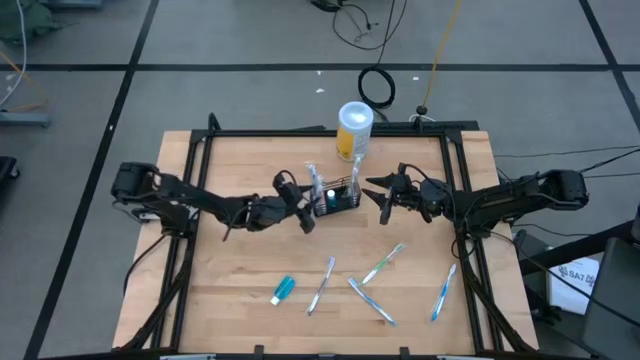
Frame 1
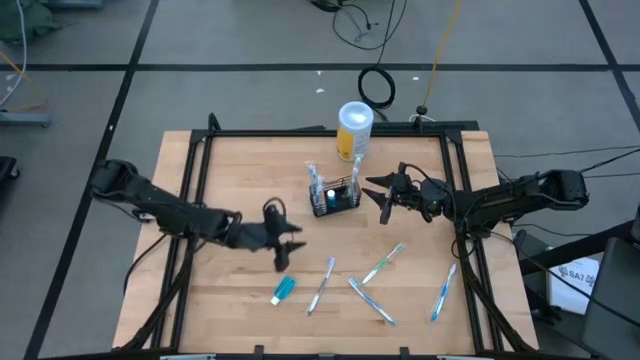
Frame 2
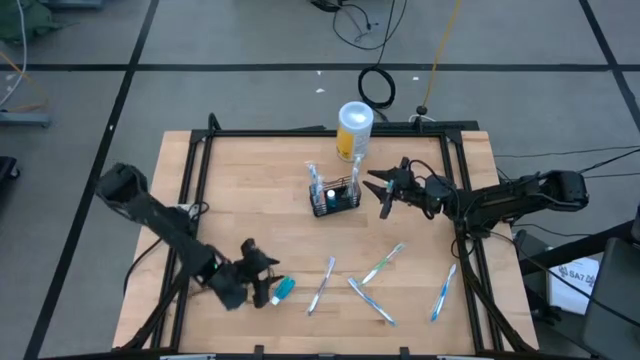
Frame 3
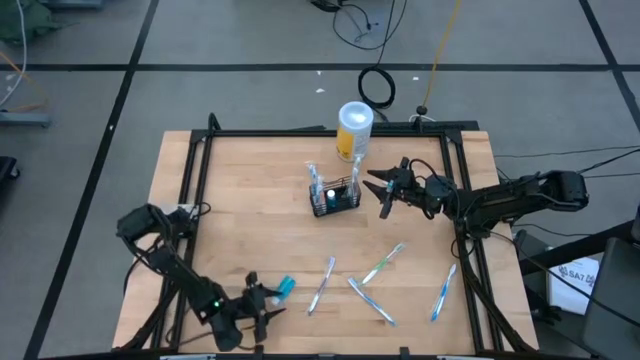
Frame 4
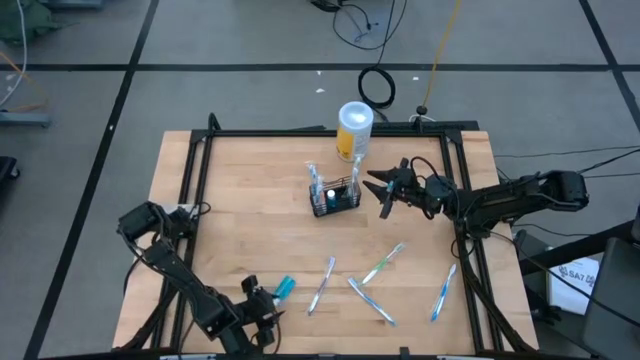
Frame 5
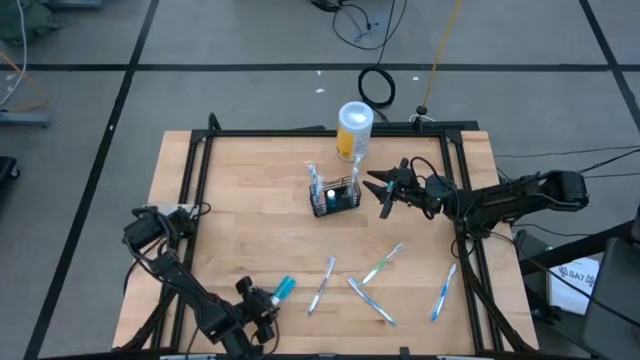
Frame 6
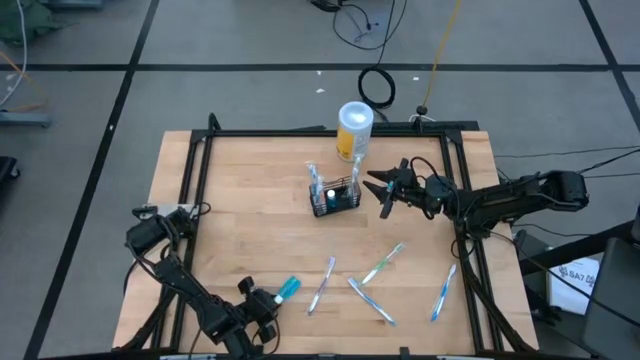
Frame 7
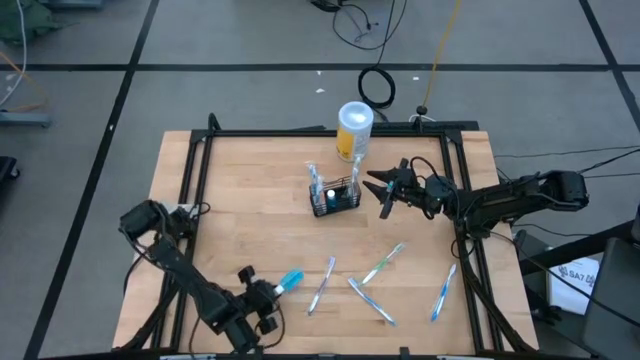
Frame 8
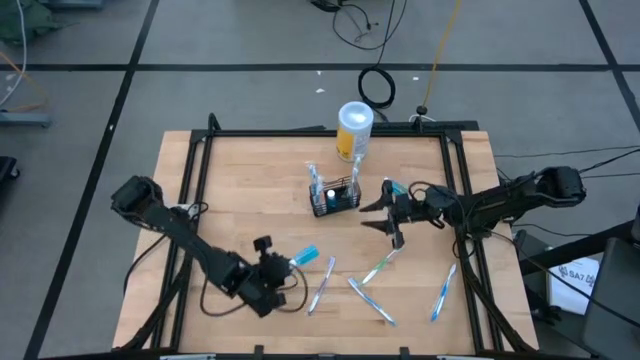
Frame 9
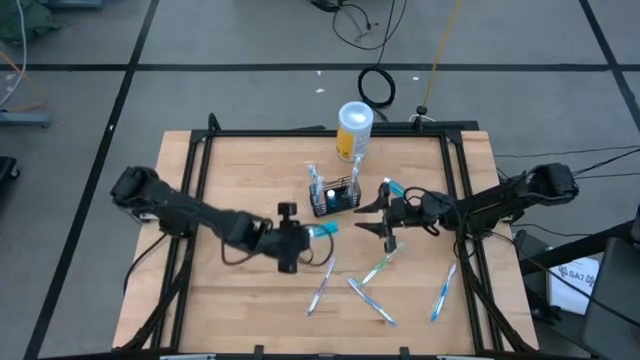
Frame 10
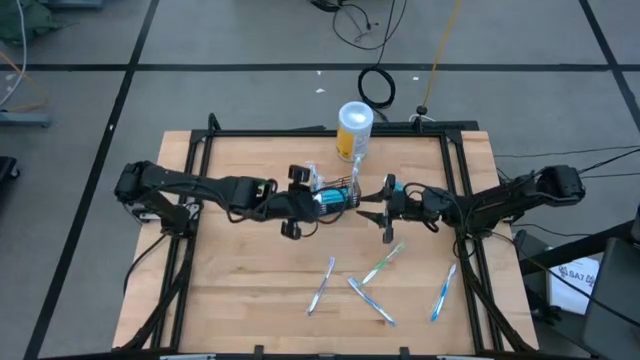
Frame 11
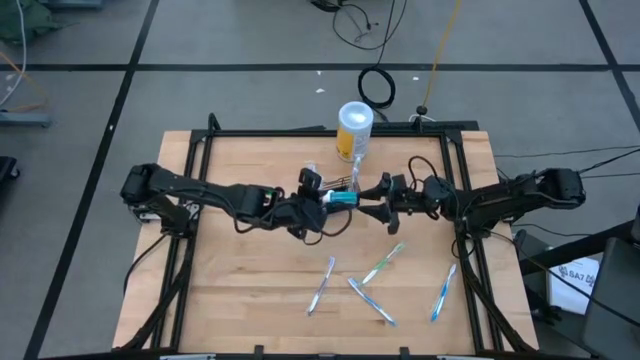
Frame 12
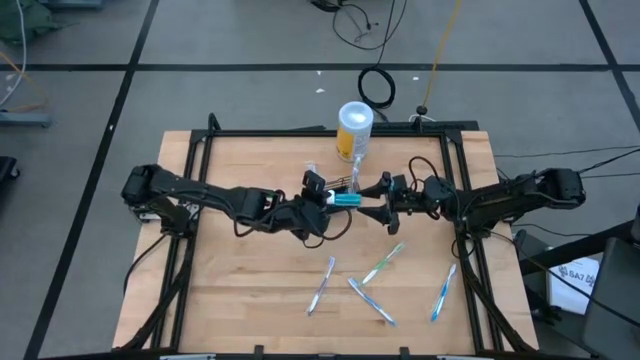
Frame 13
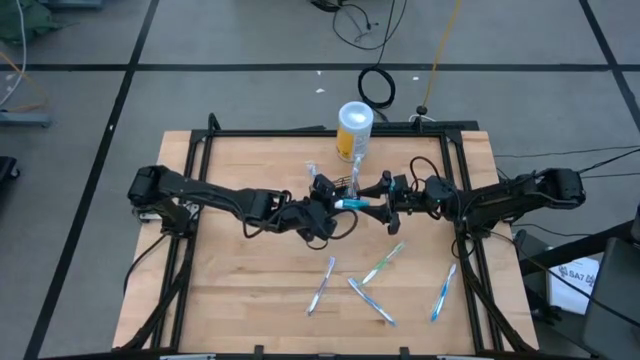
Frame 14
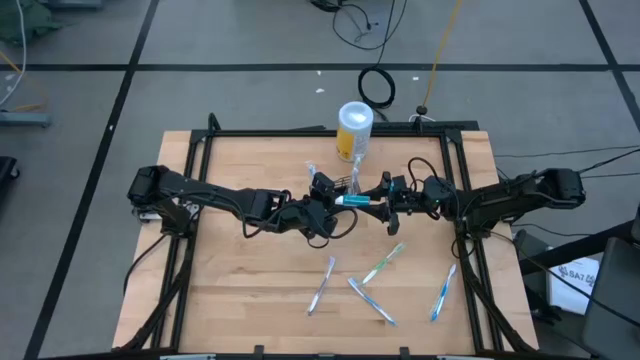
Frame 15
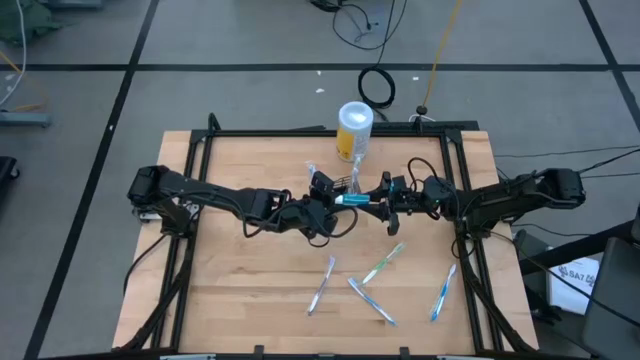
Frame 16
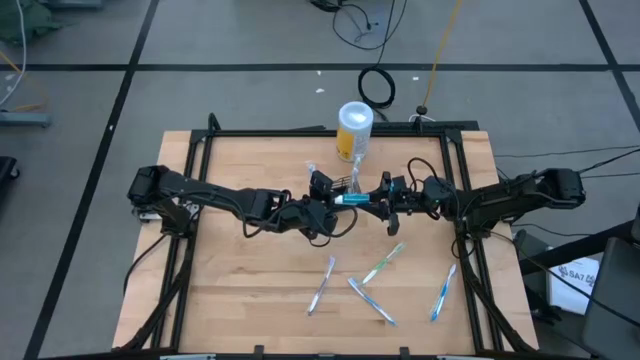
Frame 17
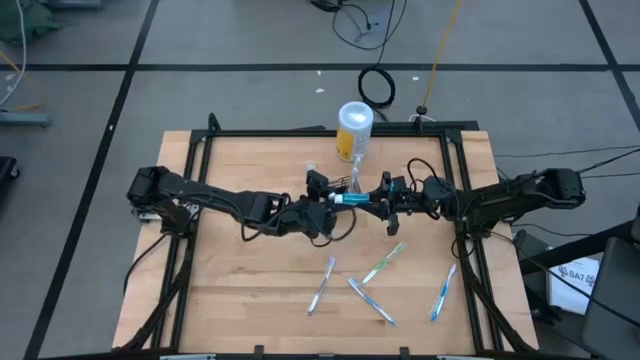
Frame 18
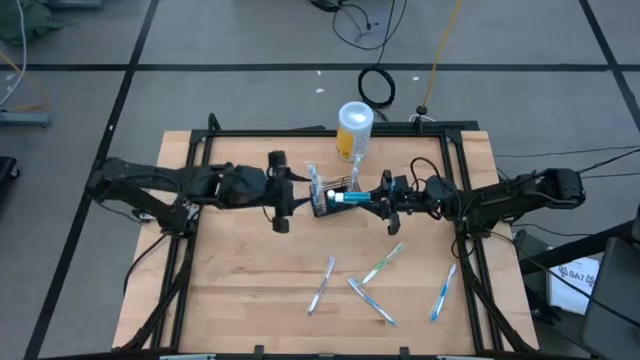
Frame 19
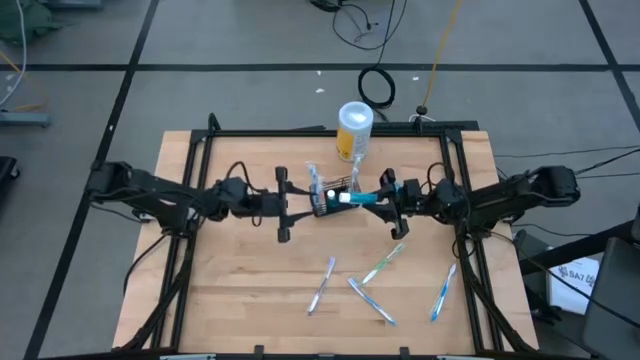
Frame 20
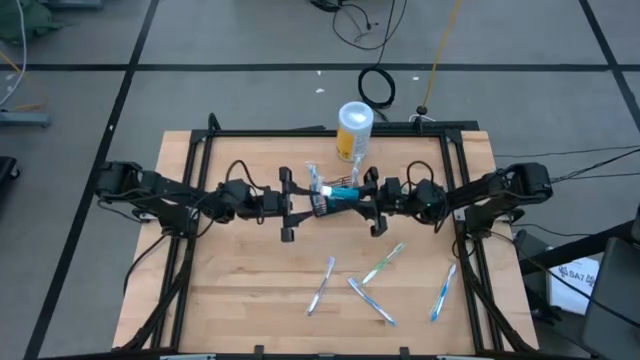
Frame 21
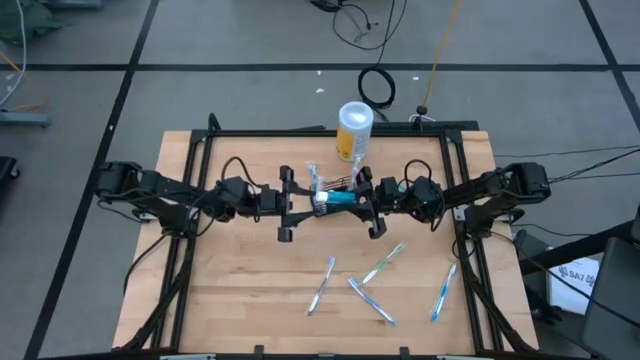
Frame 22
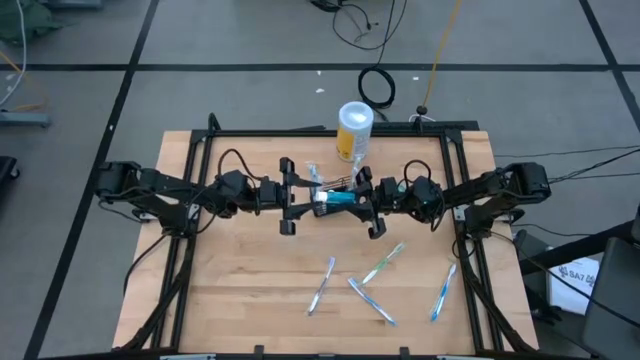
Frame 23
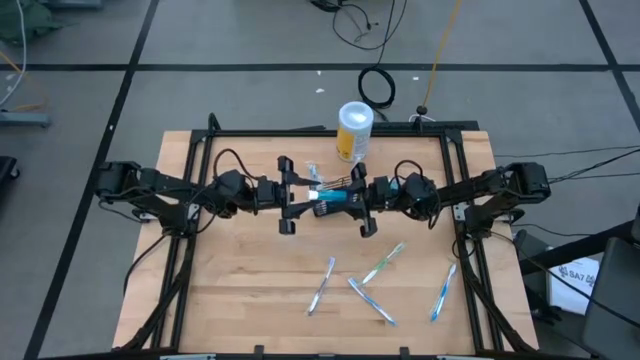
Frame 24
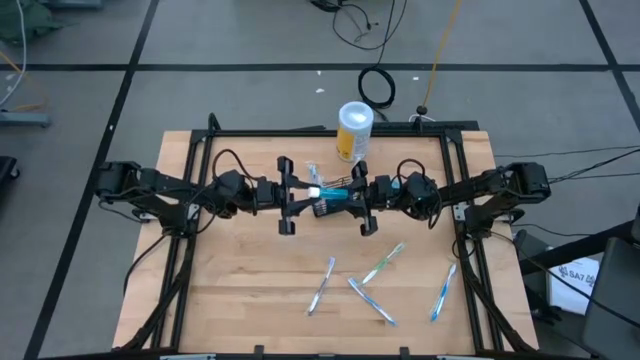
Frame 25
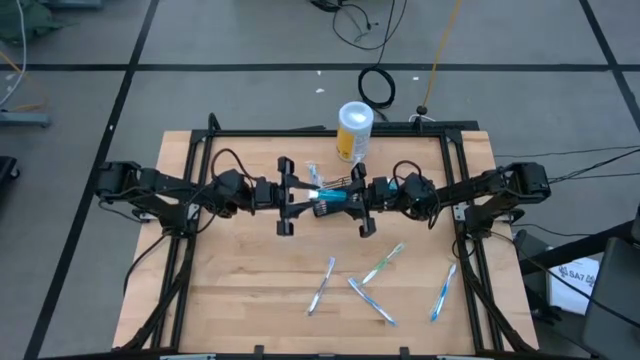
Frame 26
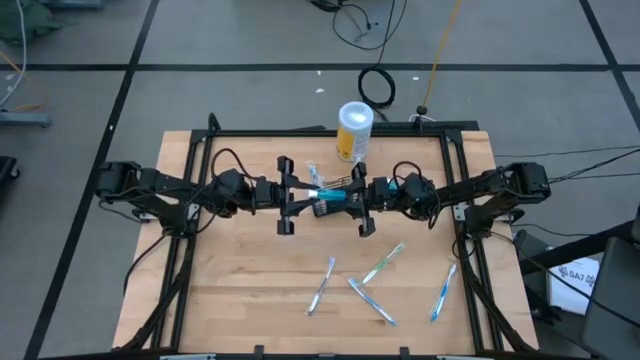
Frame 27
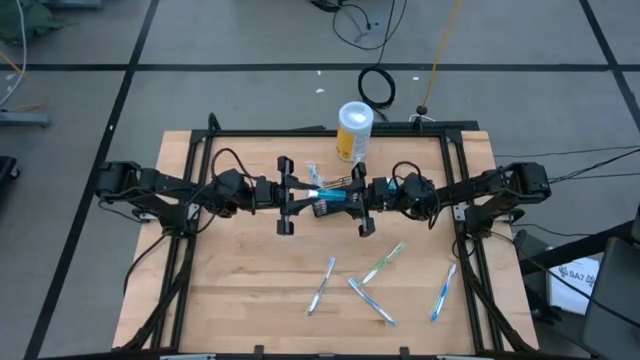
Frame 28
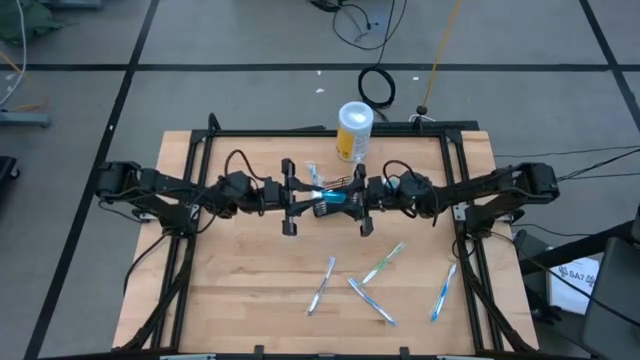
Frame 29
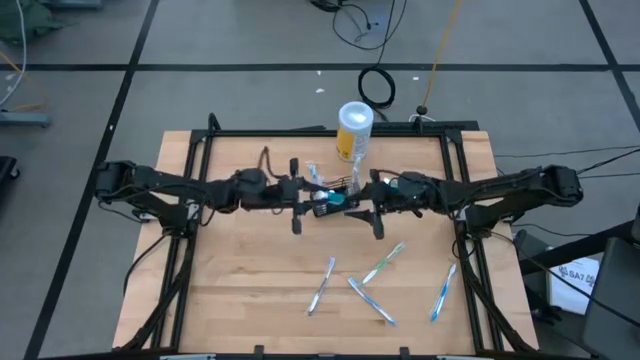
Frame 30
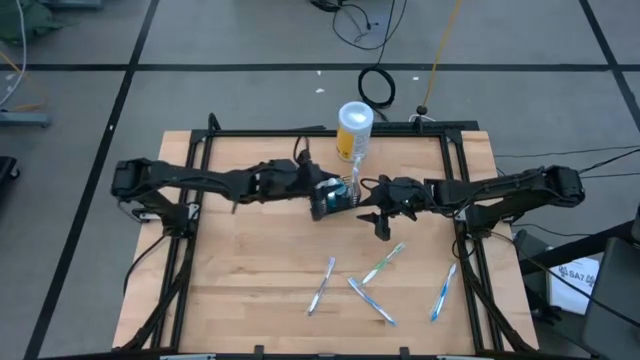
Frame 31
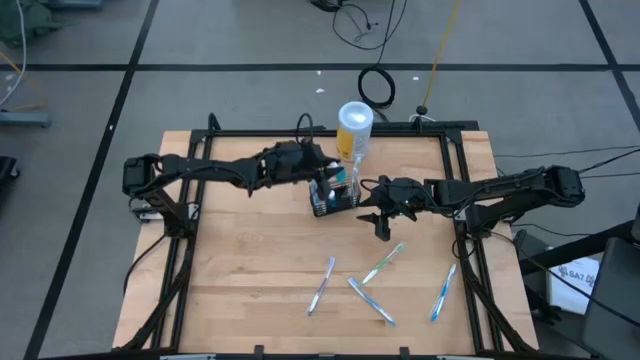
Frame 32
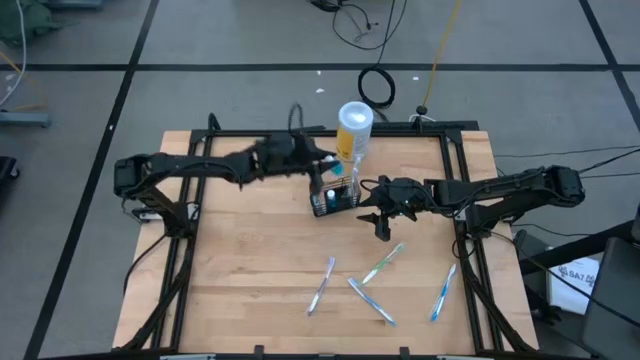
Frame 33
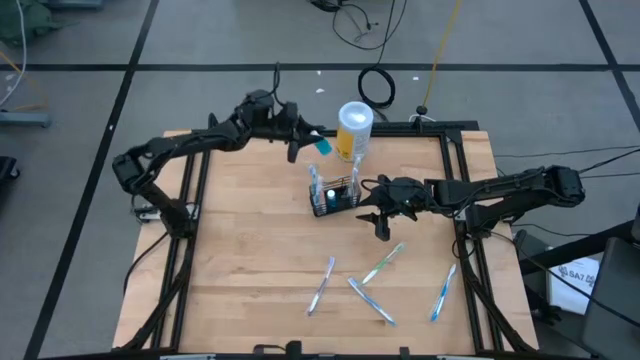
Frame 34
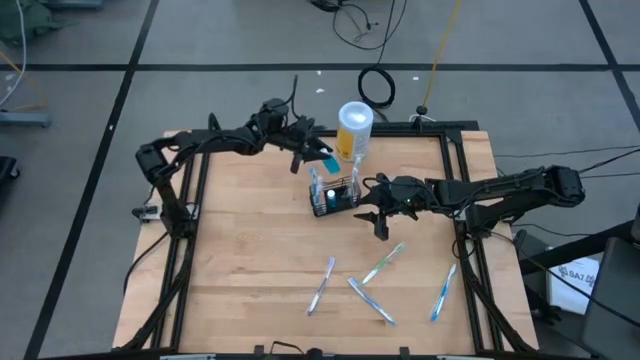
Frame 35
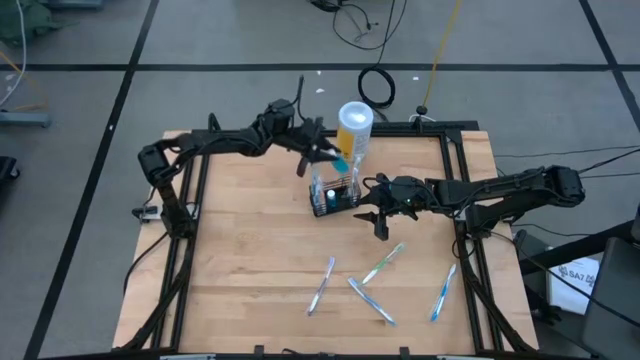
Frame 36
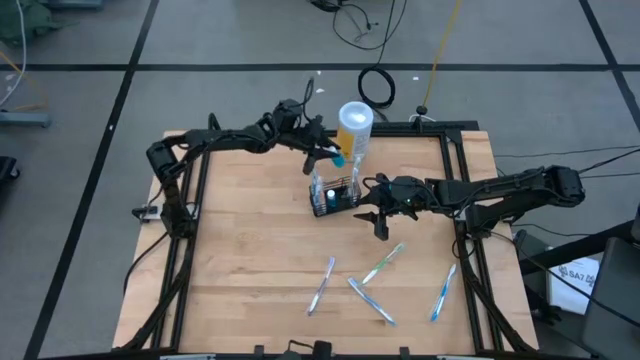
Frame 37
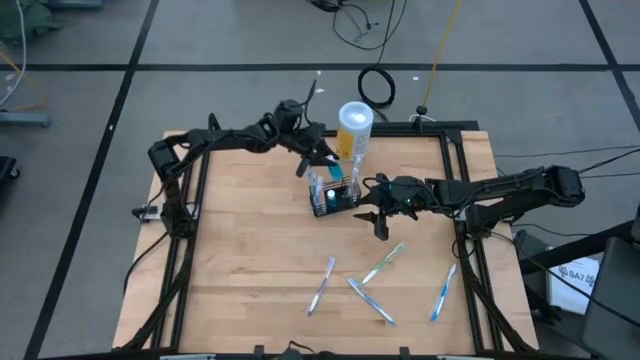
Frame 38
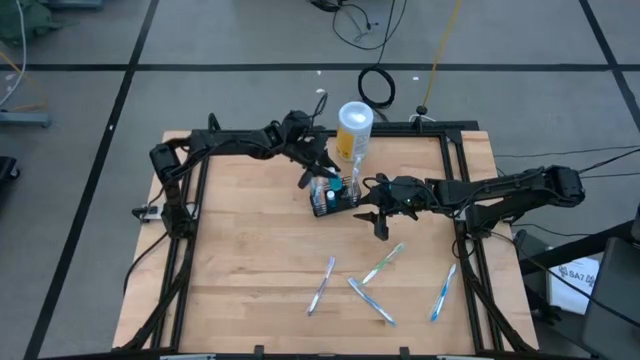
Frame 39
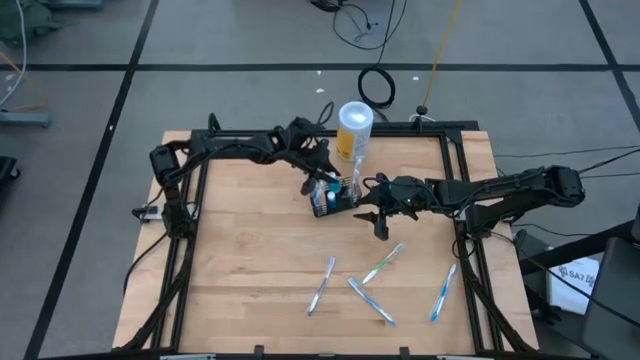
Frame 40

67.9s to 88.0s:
Task: Pick & Place toothbrushing station
Put the blue mouthwash into the black wire organizer

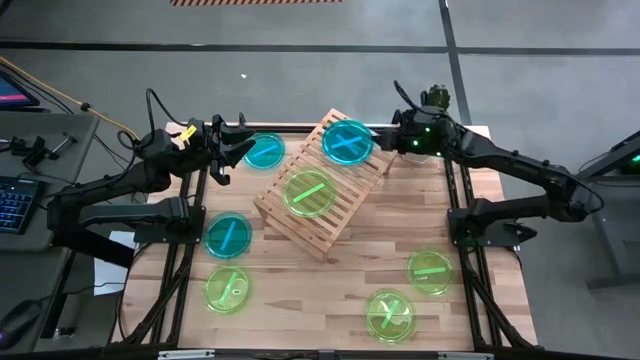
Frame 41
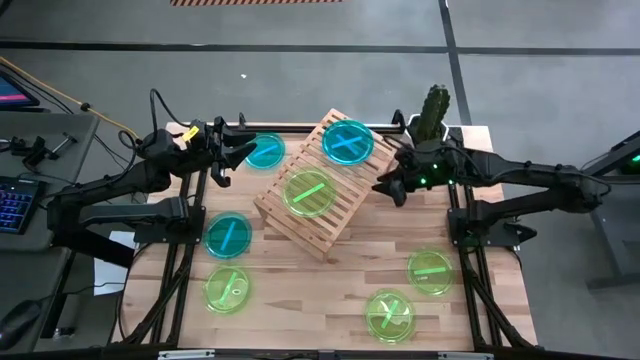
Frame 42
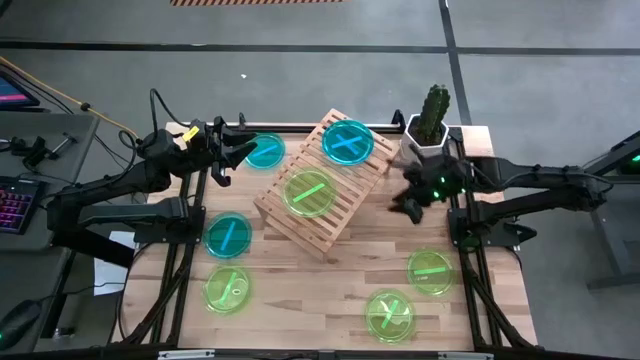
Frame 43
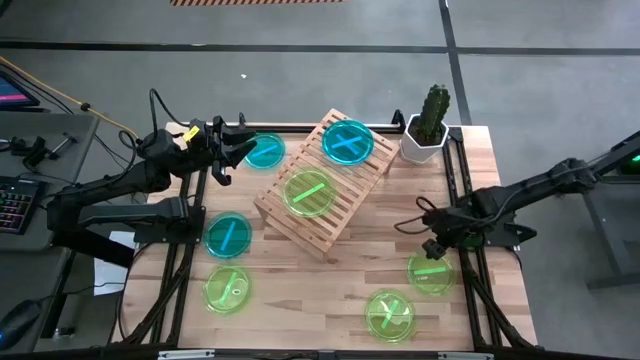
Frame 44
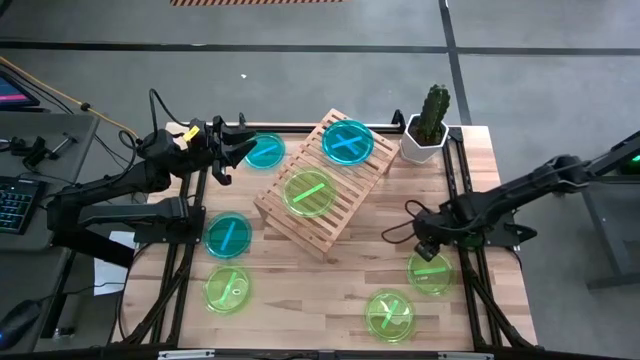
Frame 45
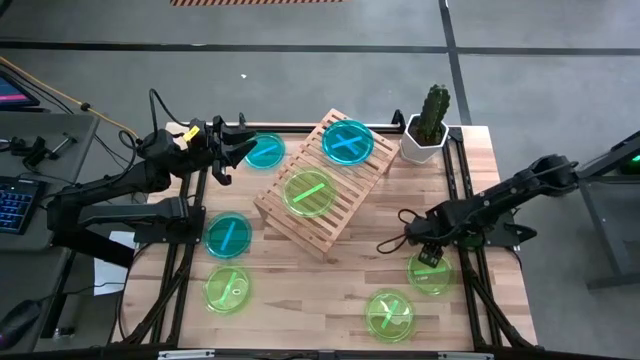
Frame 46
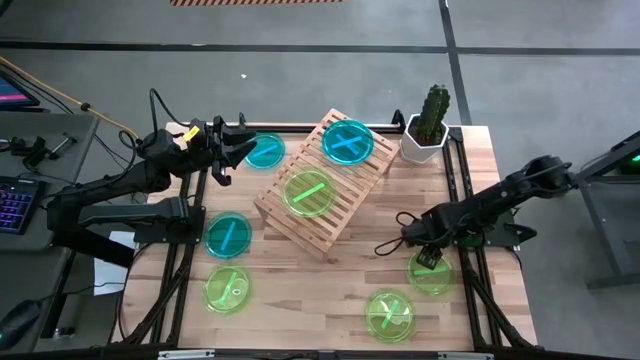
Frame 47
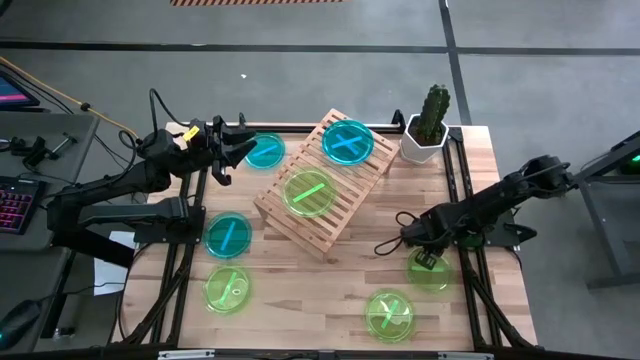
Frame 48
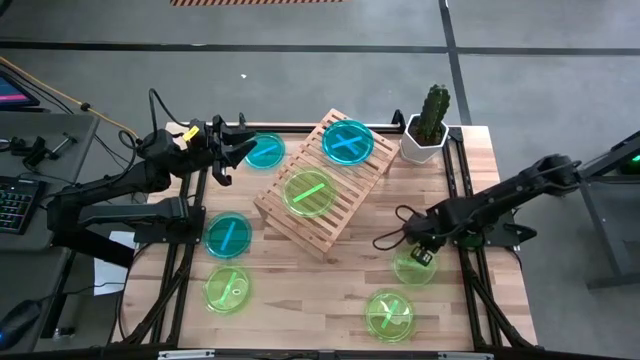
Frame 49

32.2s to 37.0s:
Task: Place and stack plates onto a shelf
Stack the green plate on top of the green plate on the shelf
